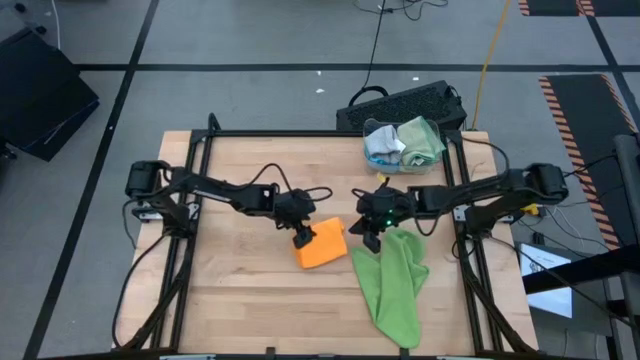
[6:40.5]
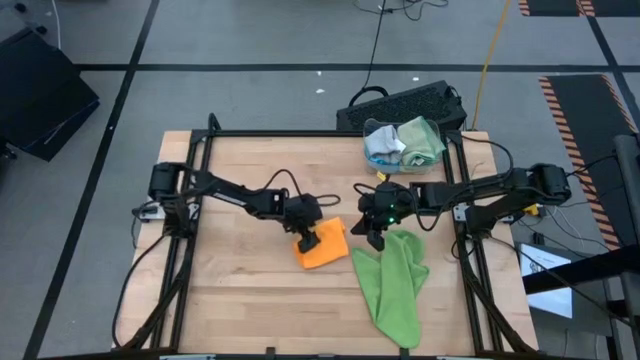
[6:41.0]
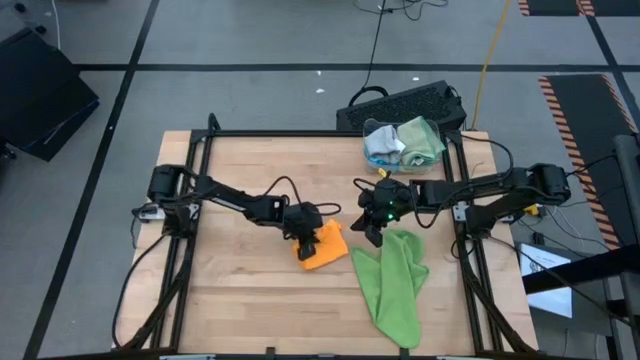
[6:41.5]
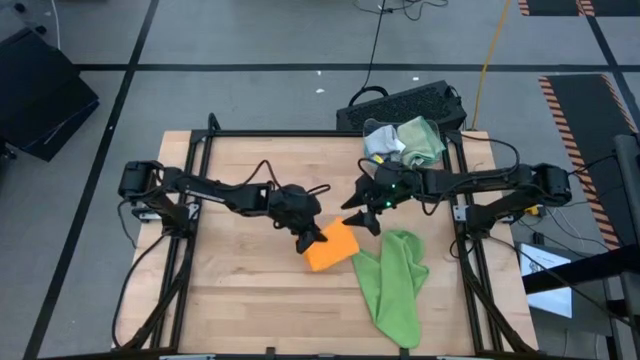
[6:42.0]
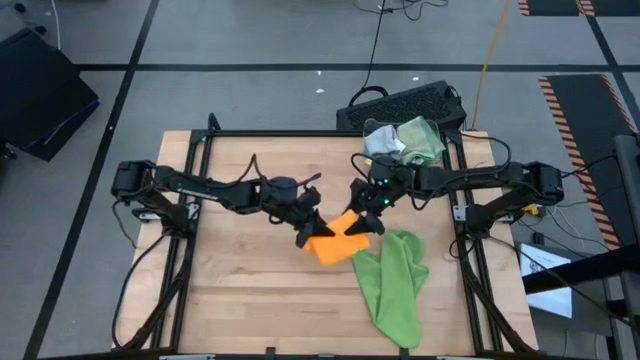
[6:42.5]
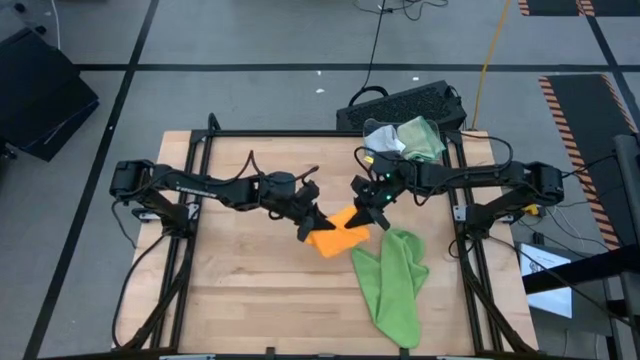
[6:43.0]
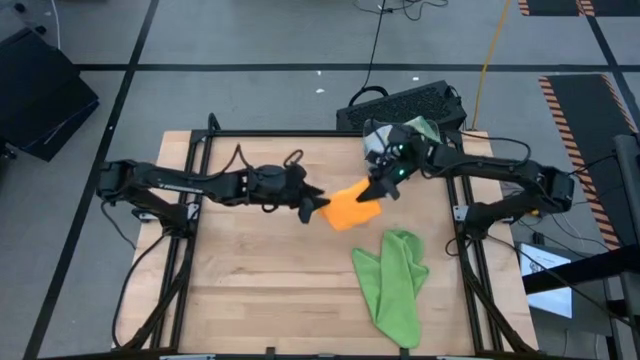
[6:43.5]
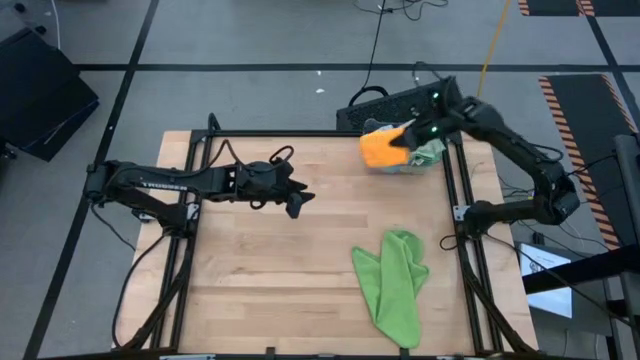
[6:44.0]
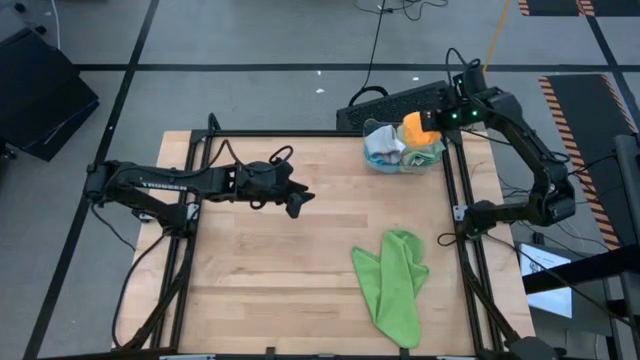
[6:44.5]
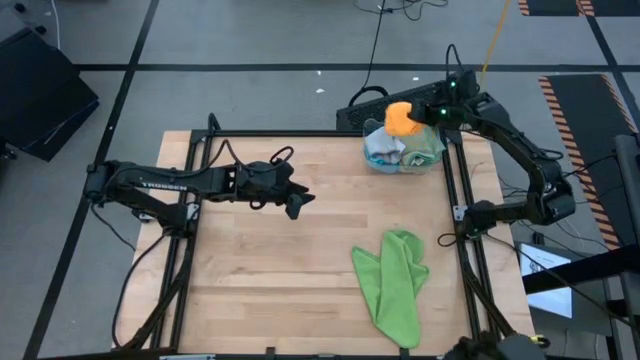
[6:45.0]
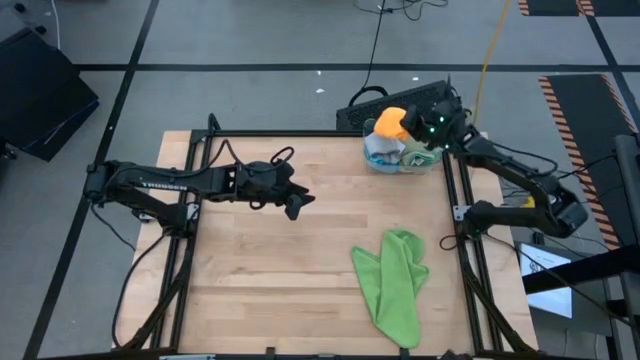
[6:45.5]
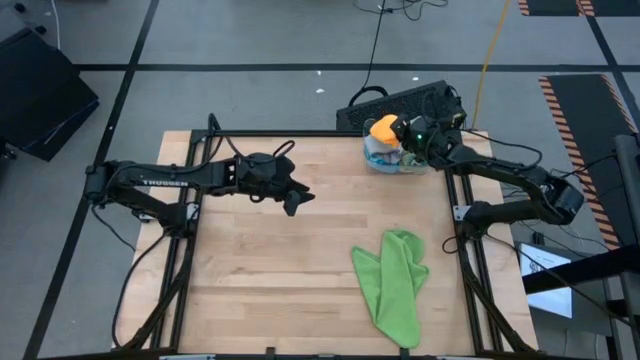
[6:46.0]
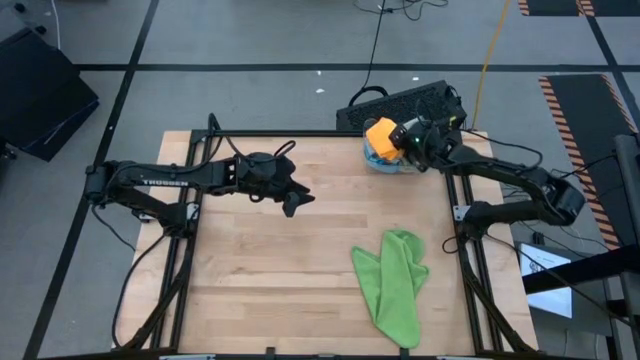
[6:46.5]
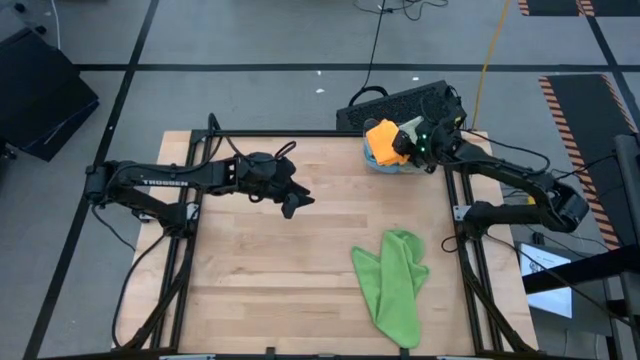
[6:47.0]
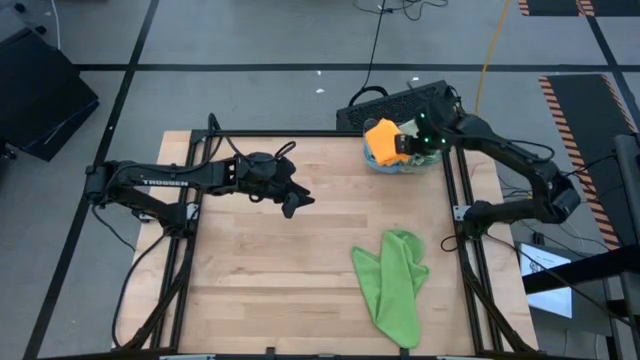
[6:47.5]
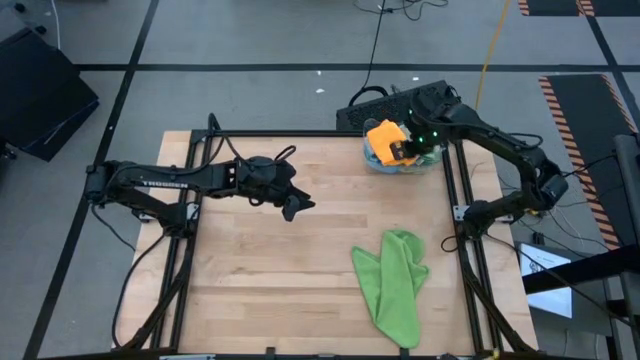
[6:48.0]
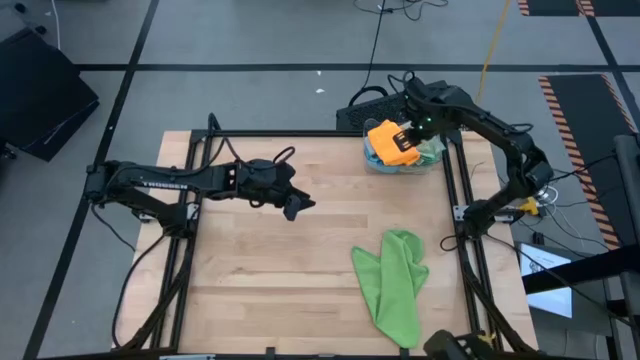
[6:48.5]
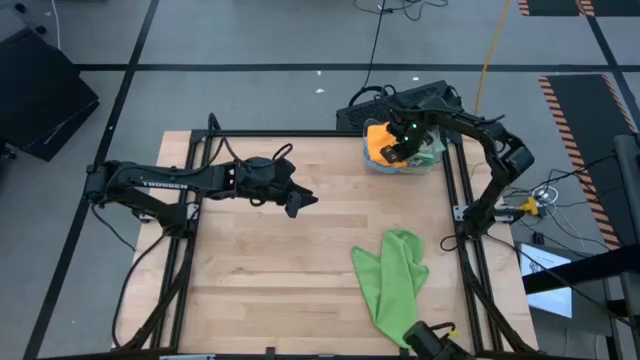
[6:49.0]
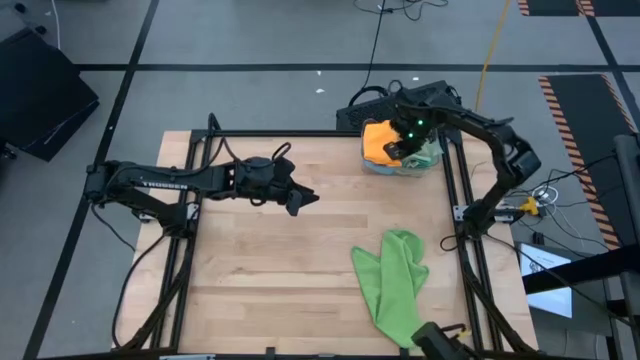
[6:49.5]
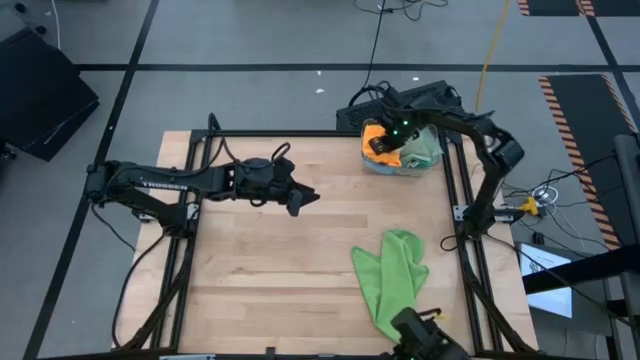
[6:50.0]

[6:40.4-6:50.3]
Task: Fold microfiber towels
Put the yellow microfiber towel into the transparent bin

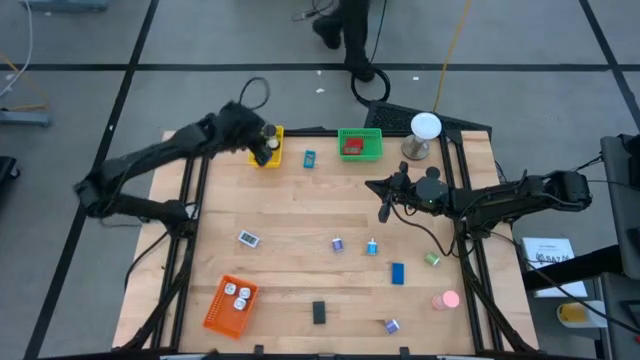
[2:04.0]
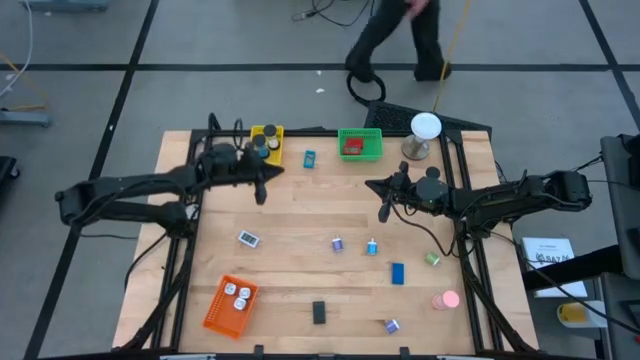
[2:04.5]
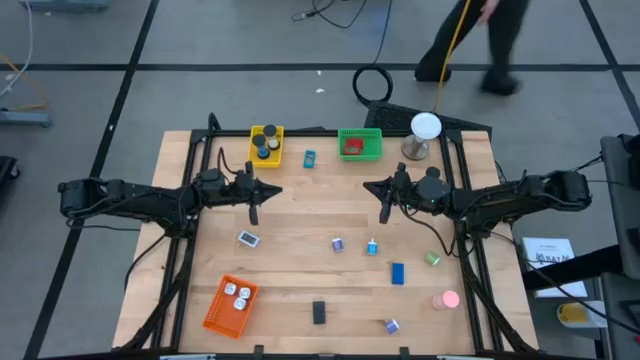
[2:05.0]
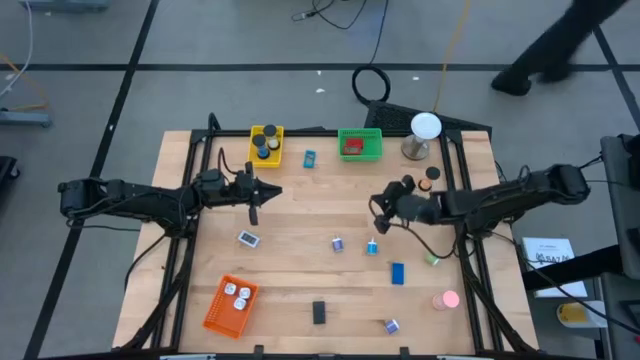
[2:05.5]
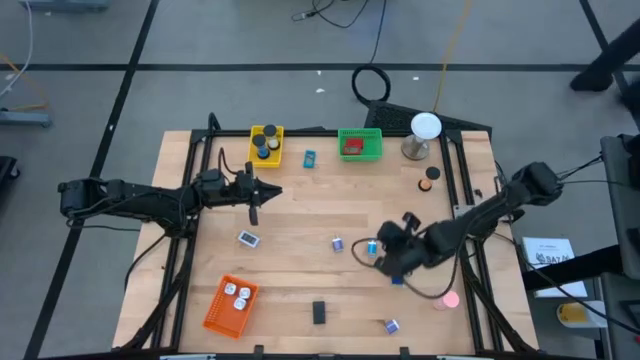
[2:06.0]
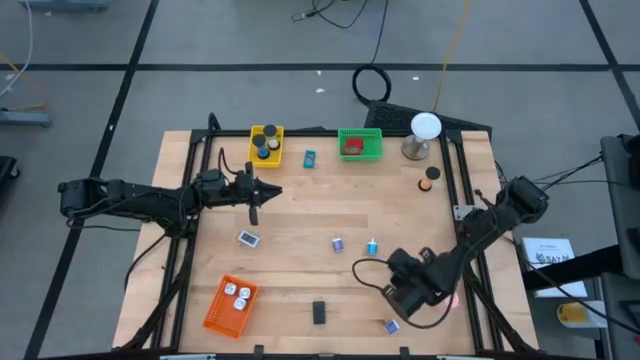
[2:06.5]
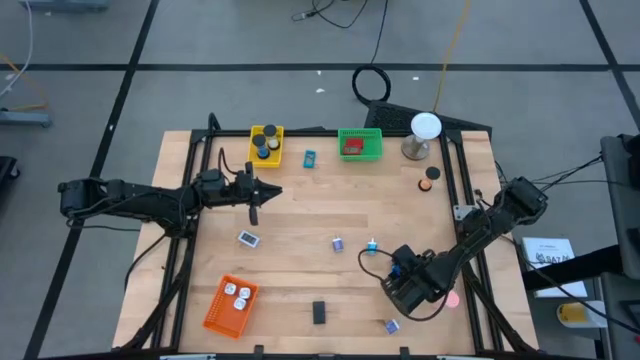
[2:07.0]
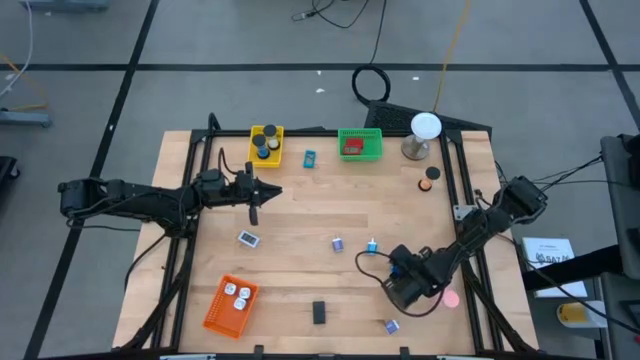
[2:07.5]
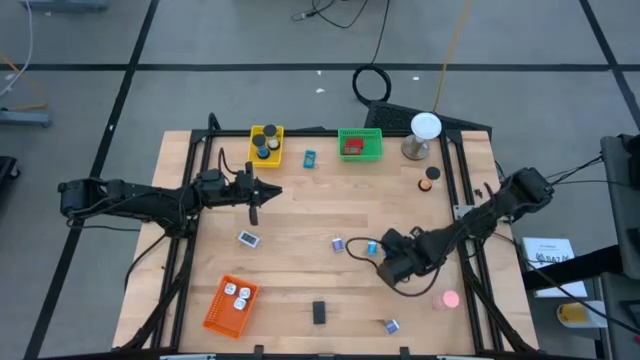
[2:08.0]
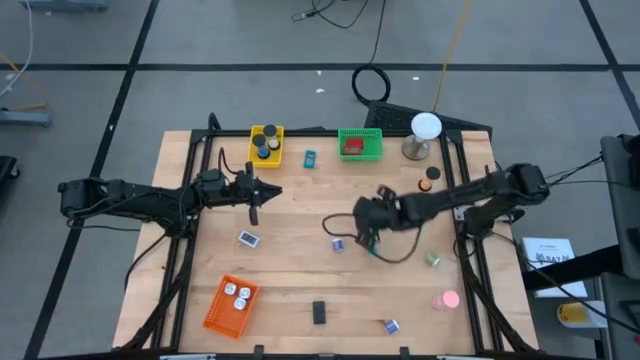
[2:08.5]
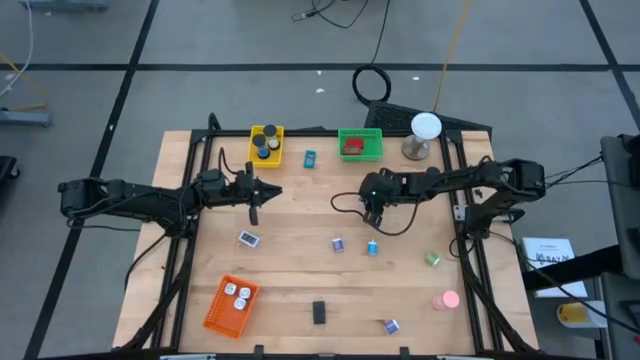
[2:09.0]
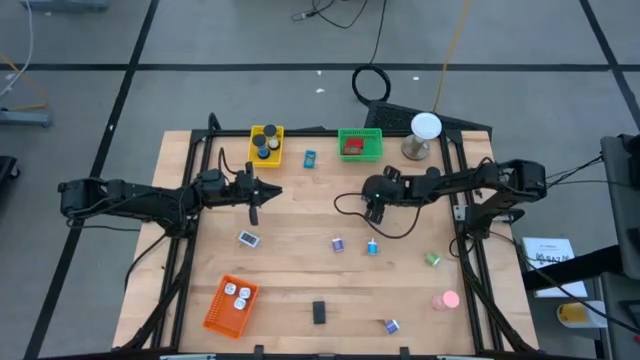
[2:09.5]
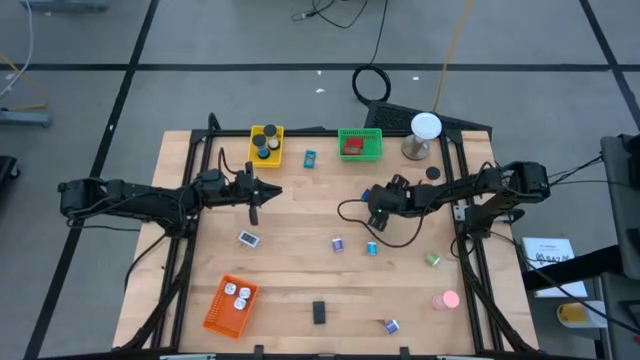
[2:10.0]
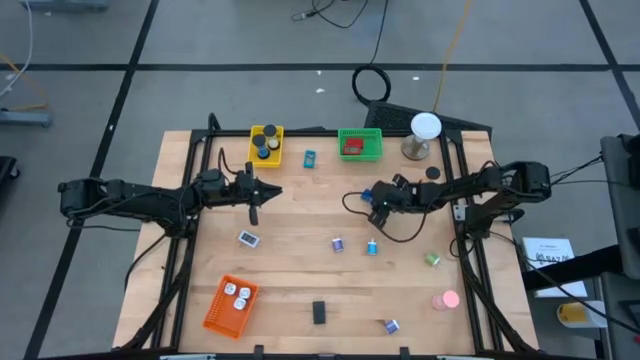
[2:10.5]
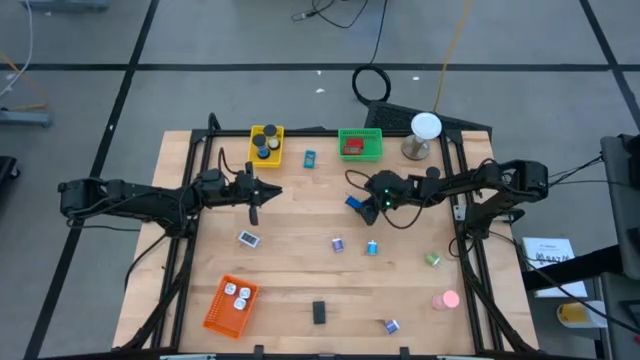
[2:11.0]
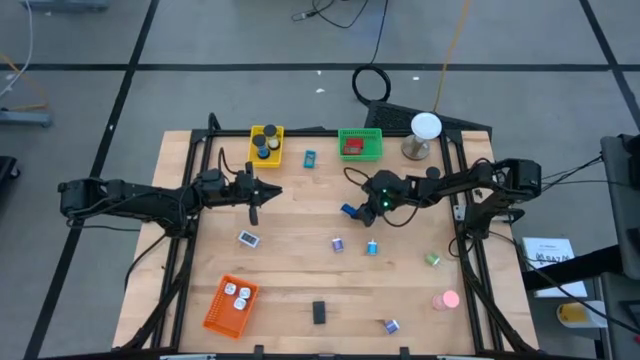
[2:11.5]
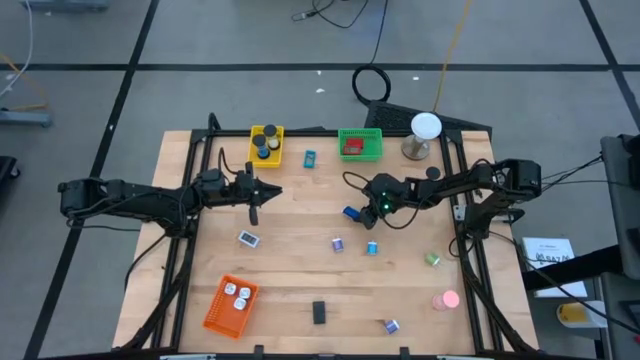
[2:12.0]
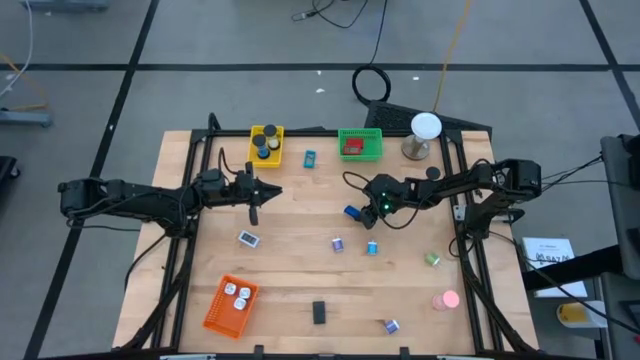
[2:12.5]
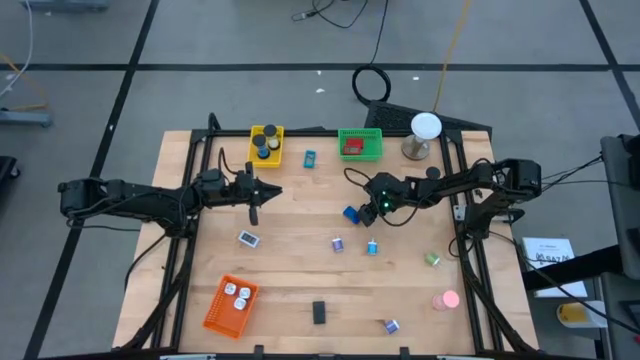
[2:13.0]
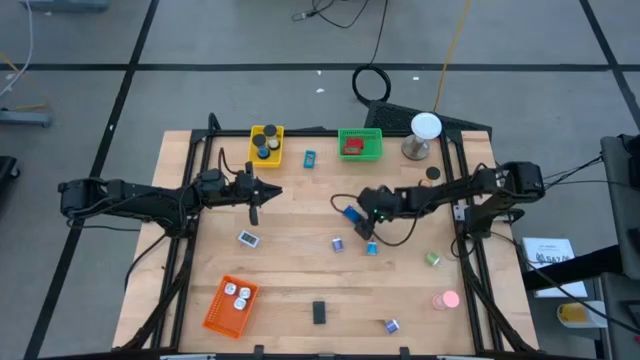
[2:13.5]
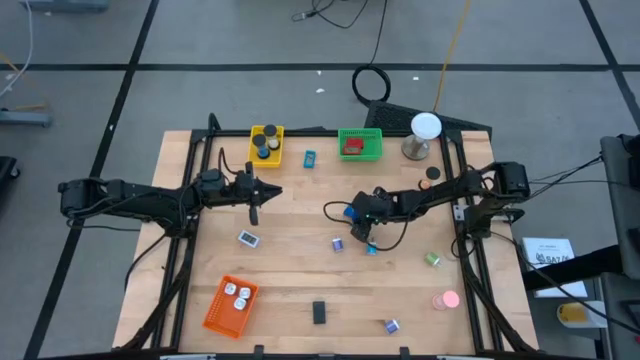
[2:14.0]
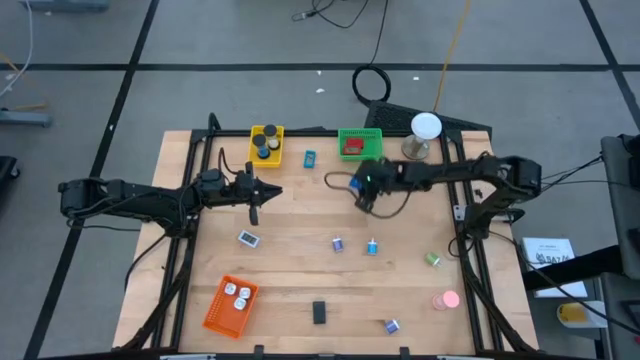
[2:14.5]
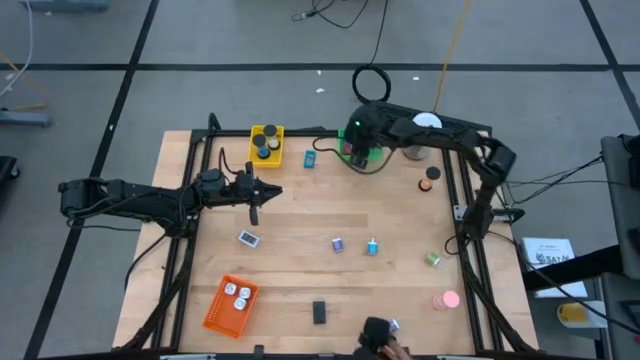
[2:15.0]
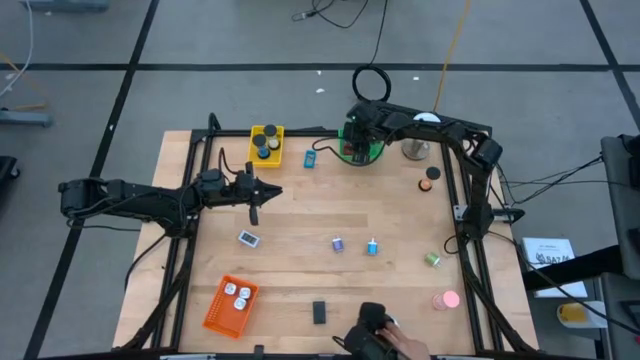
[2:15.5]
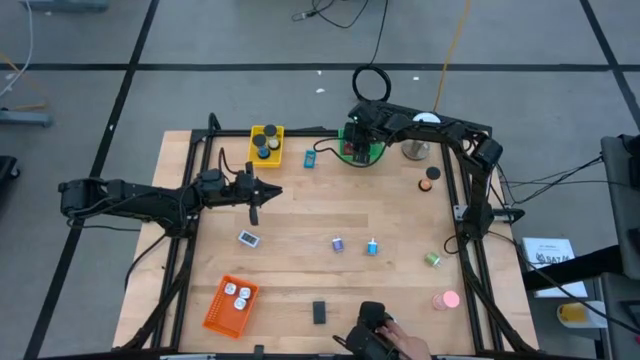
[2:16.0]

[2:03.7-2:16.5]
Task: Pick & Place Office items
Put the blue digital clock into the green bin
